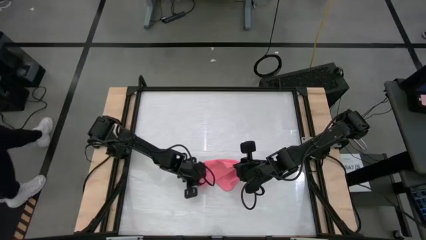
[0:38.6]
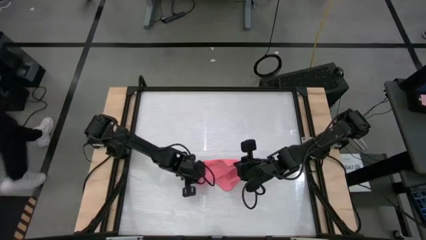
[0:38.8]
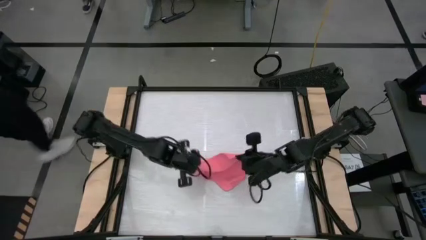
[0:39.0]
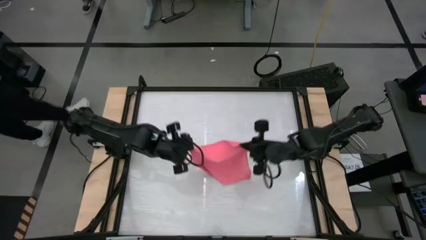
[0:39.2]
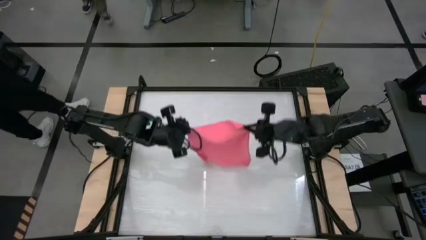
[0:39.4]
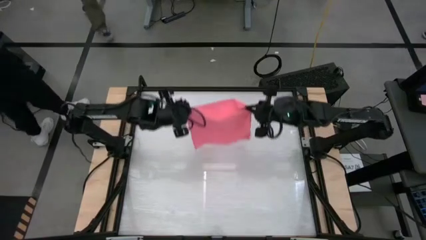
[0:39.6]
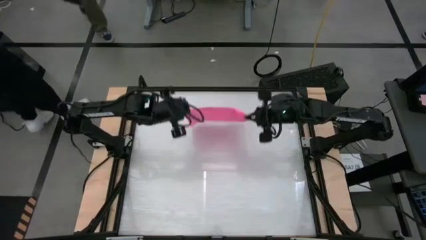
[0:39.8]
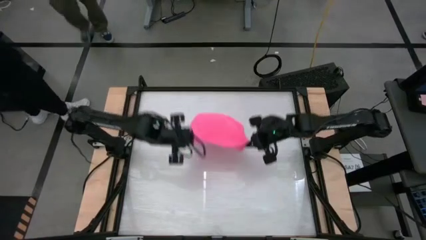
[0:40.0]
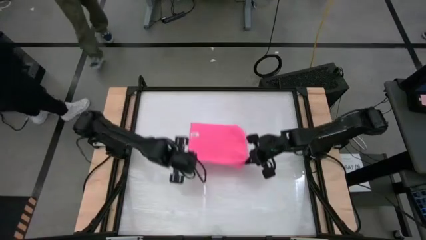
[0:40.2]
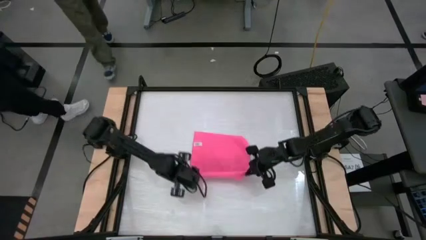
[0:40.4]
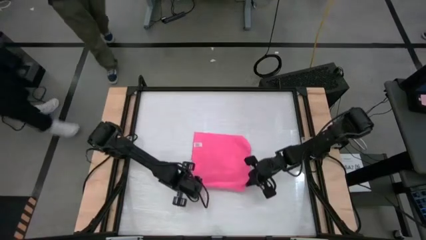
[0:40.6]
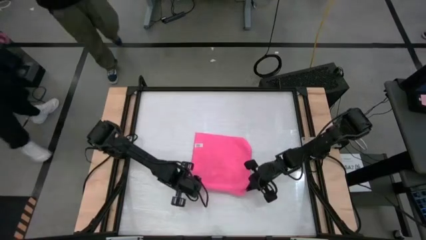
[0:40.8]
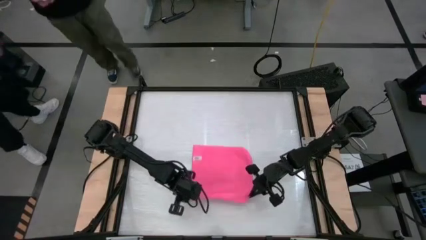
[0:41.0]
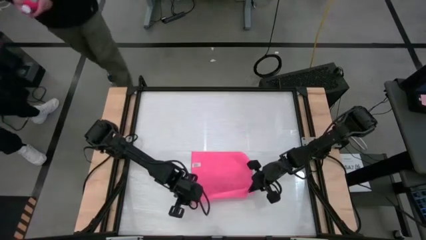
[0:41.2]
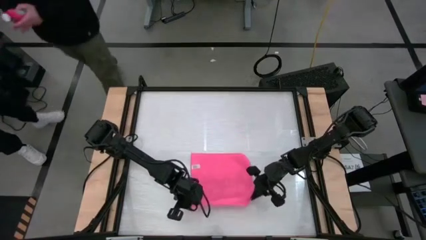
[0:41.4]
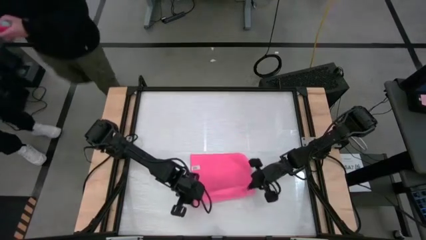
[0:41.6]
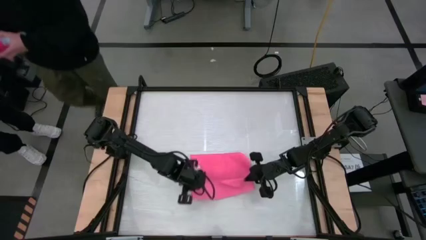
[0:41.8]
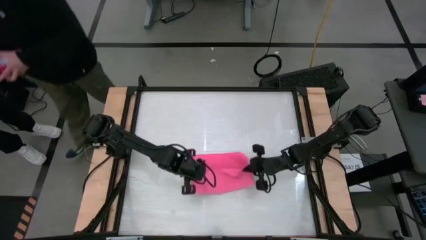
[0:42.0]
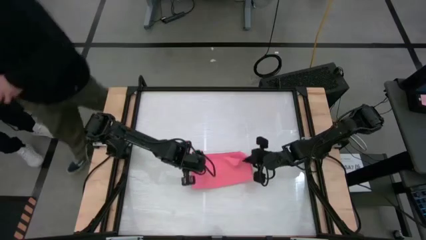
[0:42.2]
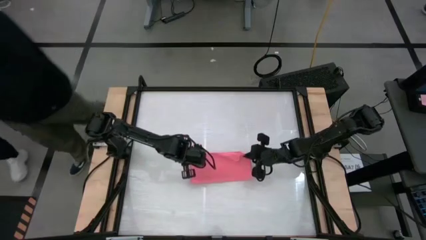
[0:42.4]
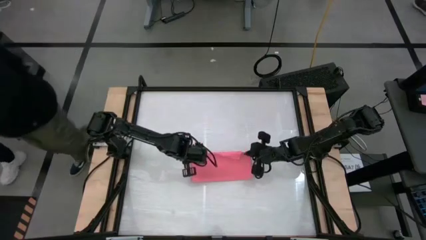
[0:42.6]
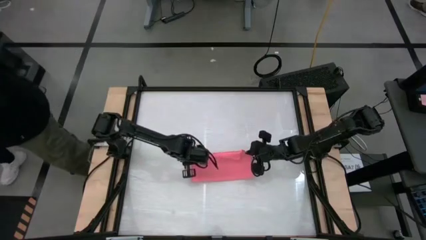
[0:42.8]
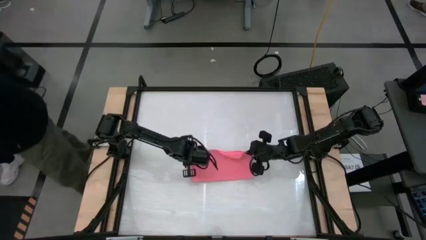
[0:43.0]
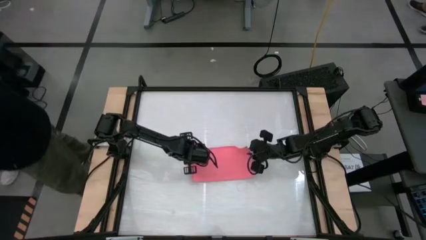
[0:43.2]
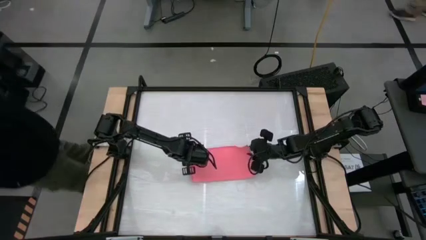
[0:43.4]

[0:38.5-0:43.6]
Task: Roll towel
Fold the pink towel

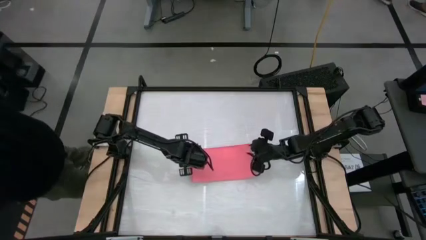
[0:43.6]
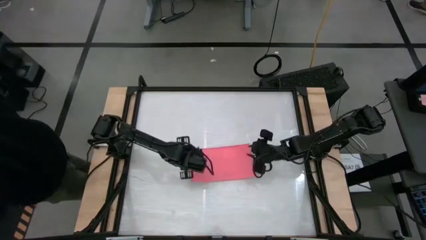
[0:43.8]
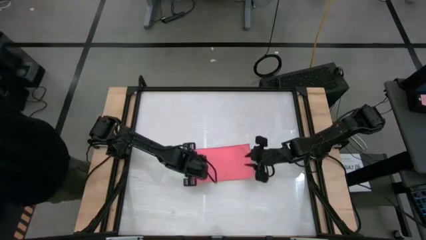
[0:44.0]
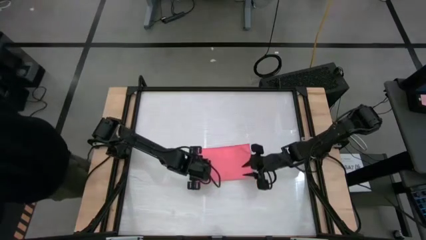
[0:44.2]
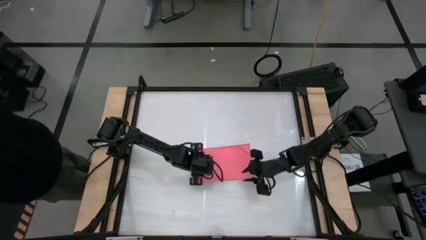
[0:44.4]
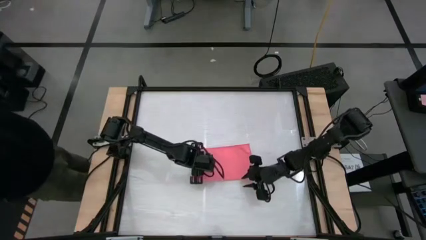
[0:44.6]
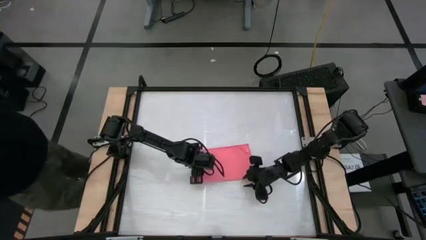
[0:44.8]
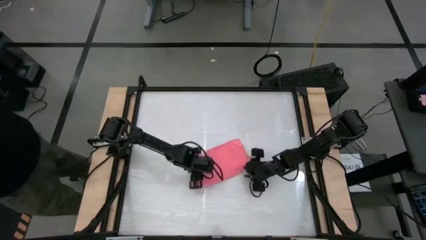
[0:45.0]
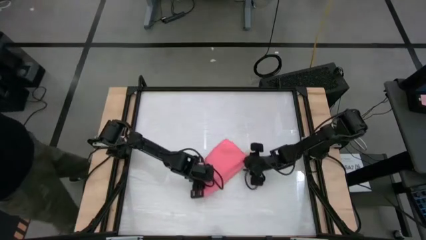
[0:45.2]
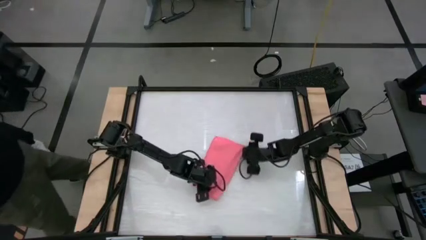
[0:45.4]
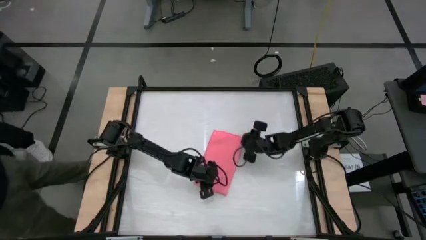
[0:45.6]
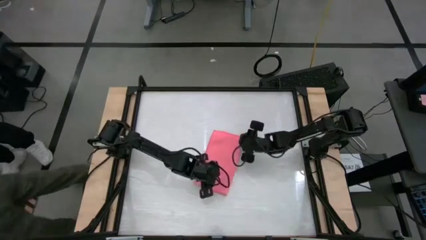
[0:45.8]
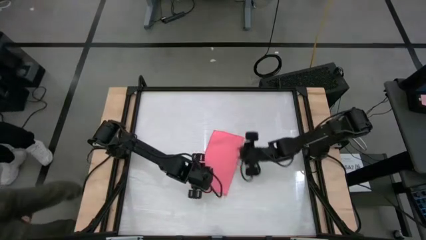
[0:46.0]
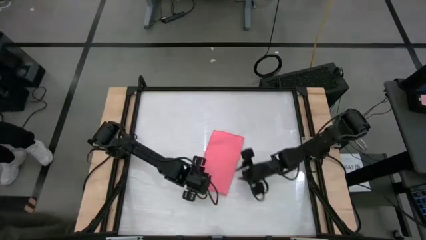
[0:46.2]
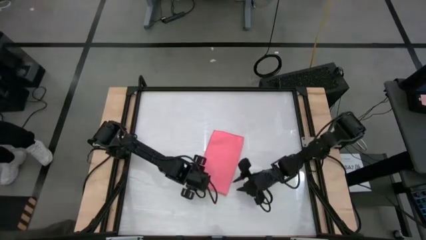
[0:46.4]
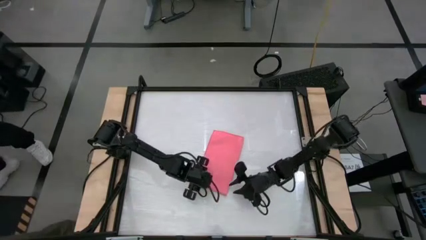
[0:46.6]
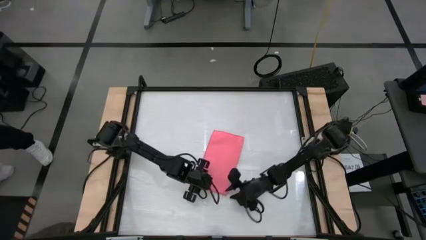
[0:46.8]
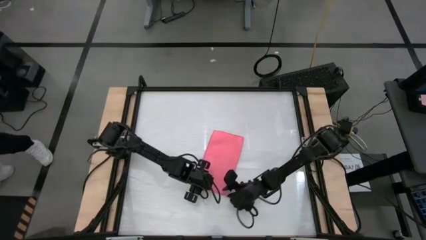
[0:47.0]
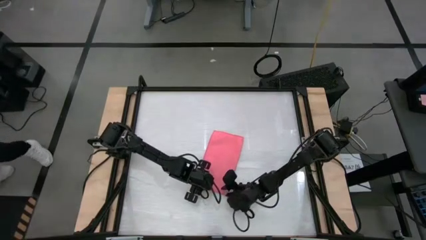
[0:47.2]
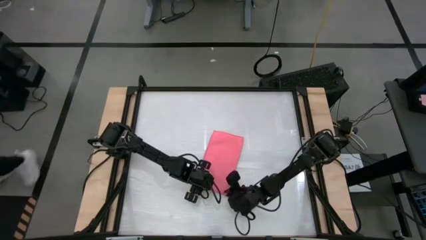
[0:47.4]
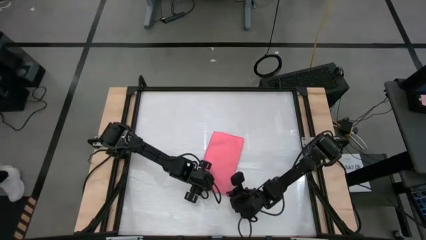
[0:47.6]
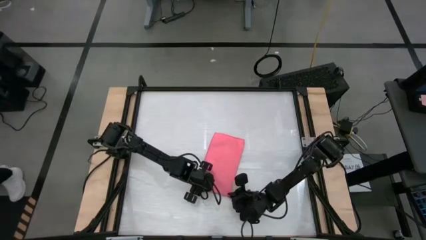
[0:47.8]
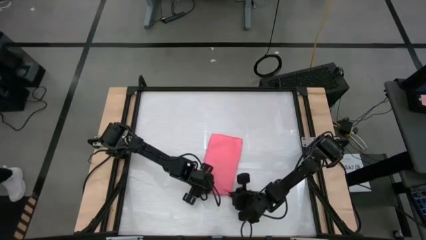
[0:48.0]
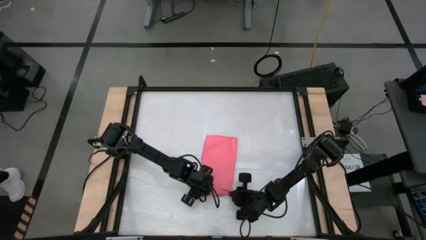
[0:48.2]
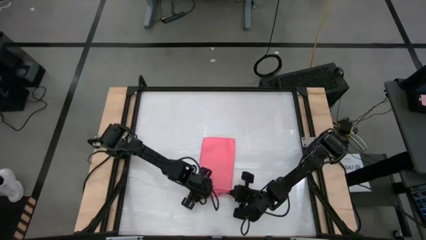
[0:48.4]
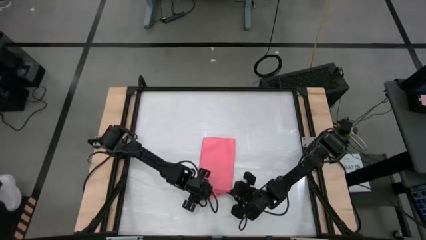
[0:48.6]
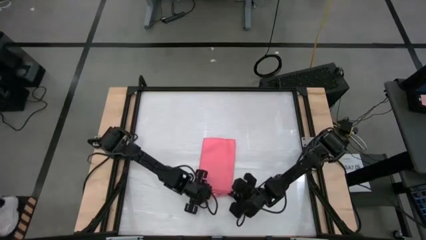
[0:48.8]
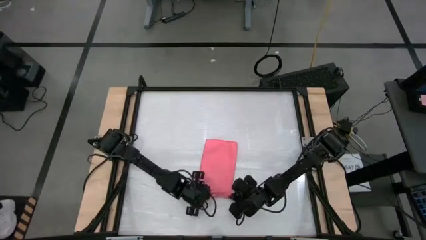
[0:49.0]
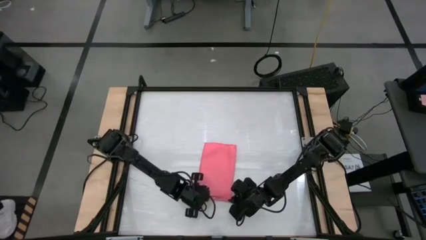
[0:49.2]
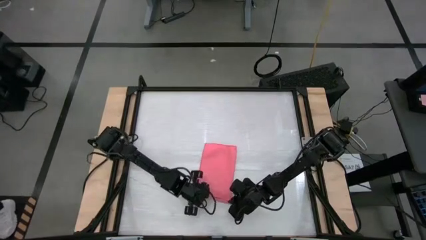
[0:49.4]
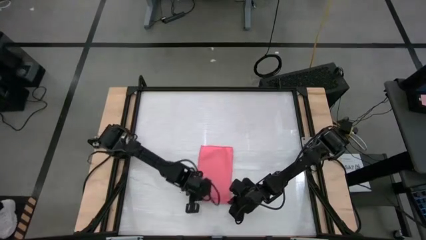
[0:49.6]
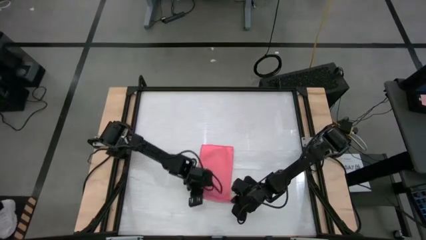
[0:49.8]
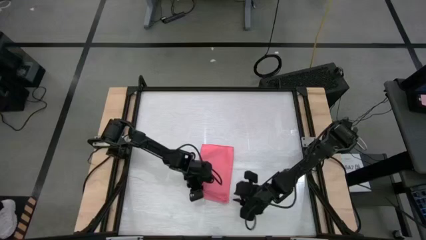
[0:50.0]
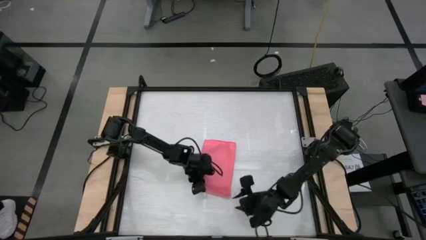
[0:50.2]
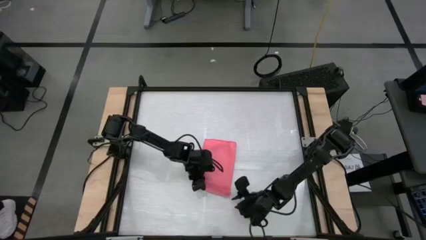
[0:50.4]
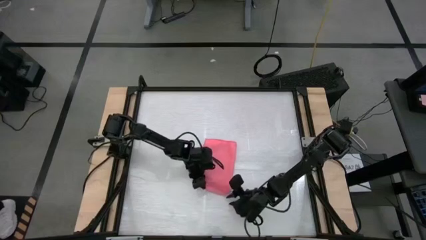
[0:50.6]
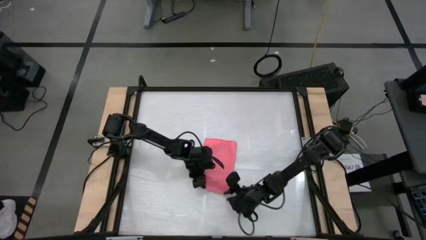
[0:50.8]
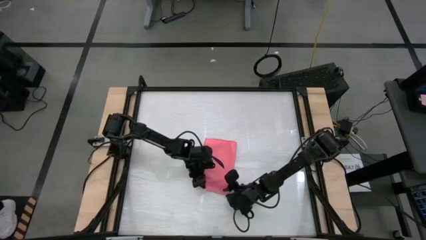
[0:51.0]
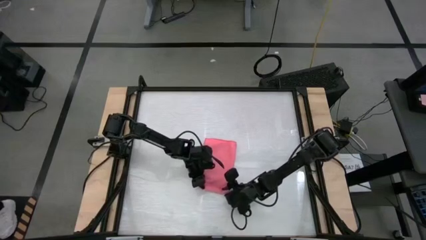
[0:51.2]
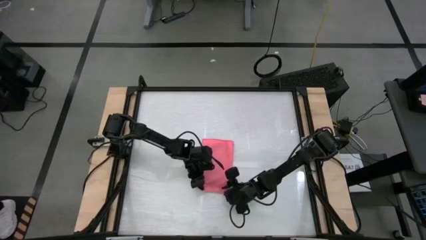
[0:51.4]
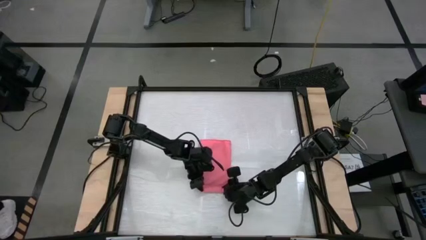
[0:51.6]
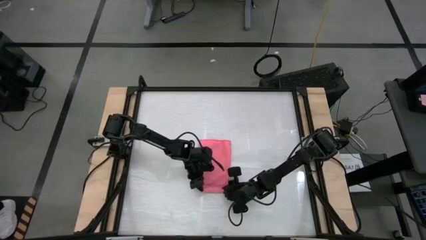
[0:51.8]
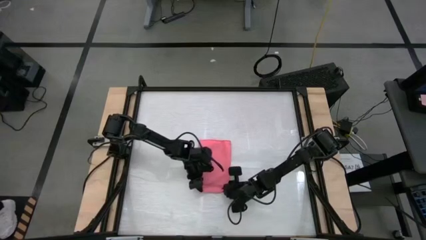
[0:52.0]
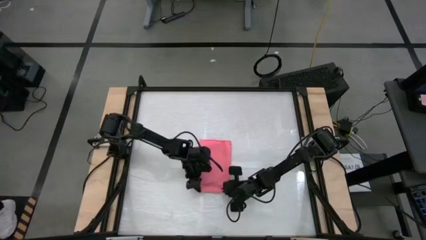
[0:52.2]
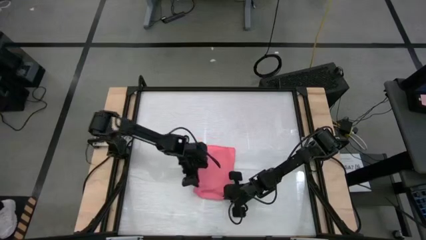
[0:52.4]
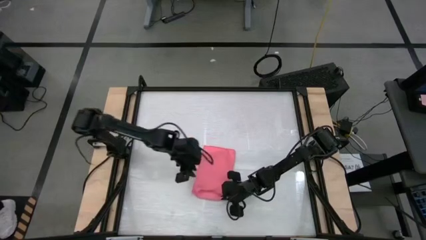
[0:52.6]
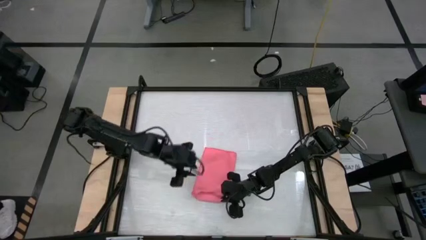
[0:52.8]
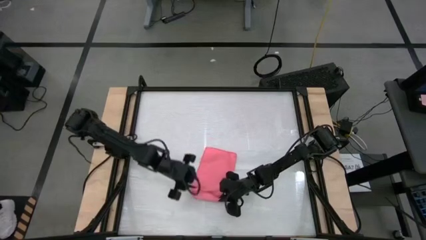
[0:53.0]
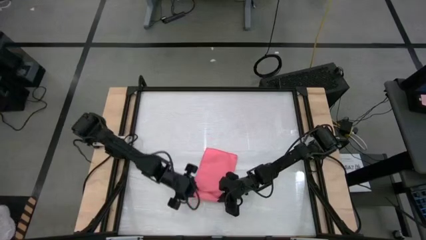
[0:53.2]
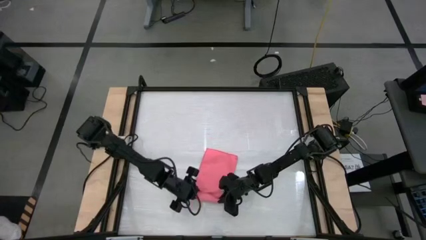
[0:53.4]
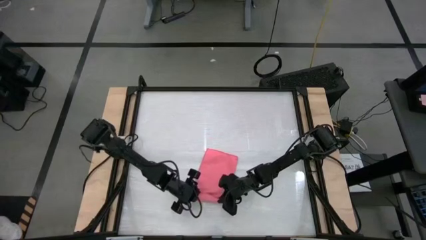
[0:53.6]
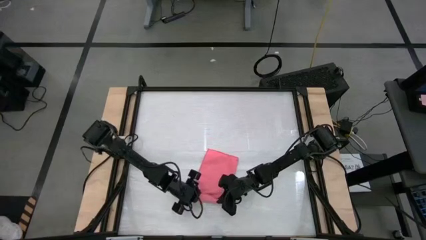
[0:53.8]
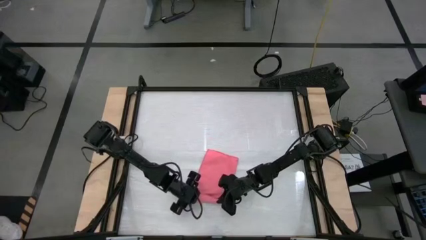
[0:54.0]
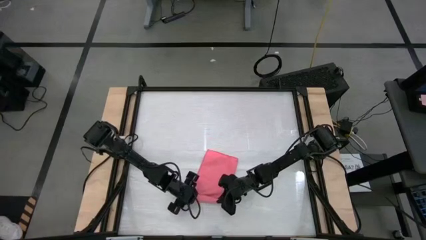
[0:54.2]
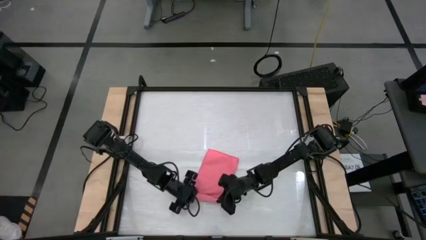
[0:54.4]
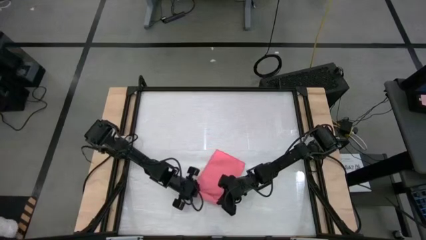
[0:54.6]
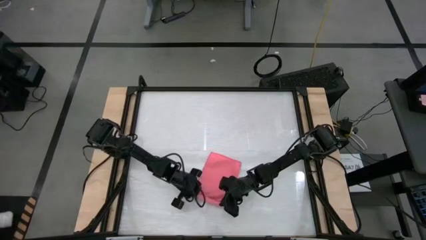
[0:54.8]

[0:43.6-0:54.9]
Roll the pink towel
